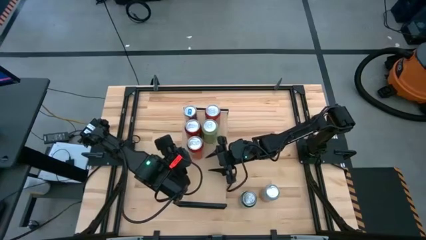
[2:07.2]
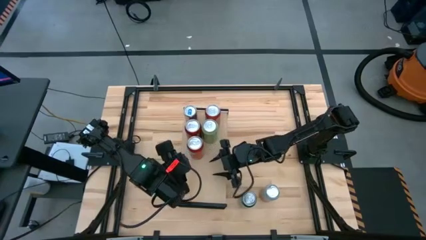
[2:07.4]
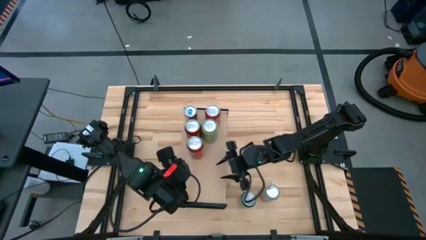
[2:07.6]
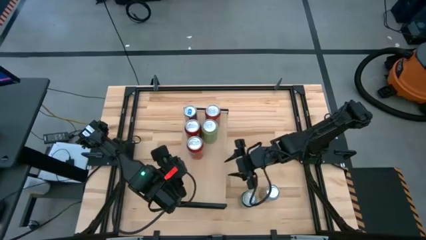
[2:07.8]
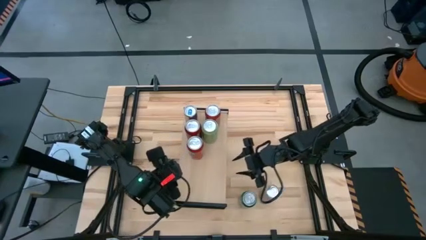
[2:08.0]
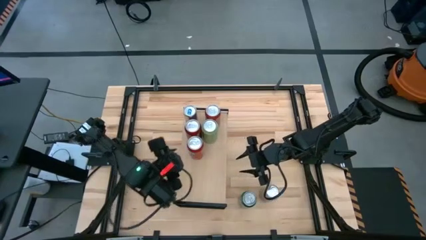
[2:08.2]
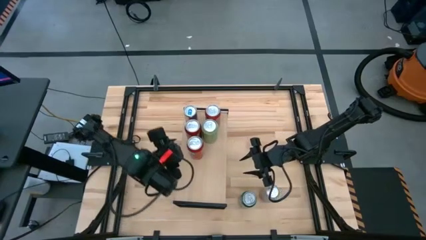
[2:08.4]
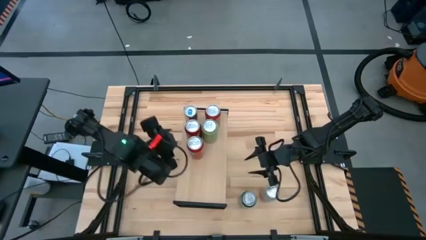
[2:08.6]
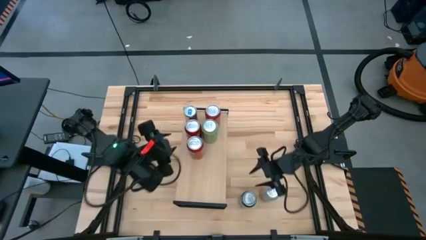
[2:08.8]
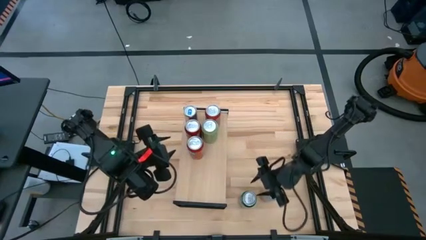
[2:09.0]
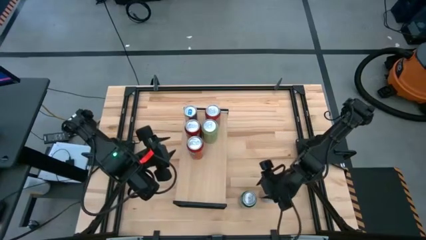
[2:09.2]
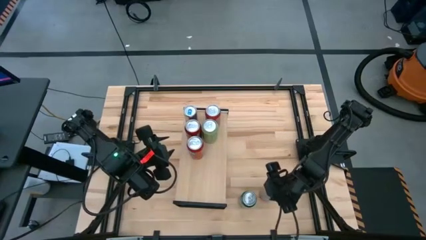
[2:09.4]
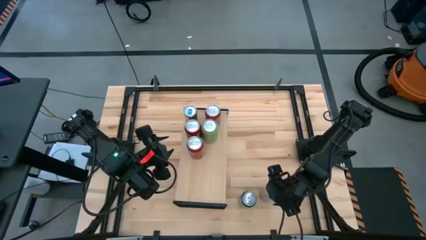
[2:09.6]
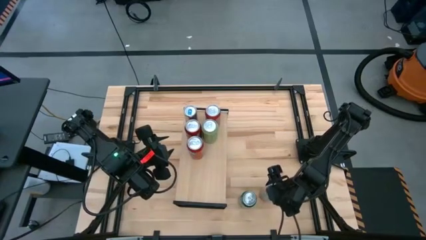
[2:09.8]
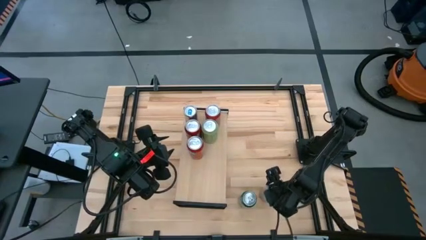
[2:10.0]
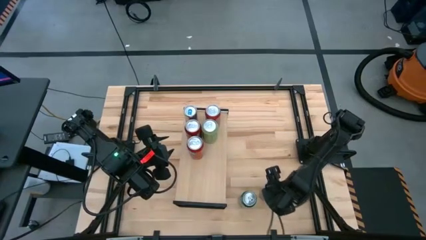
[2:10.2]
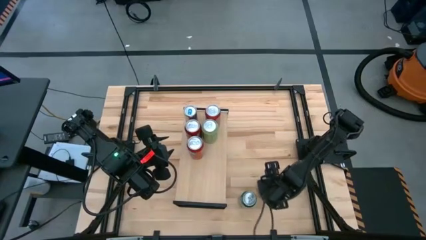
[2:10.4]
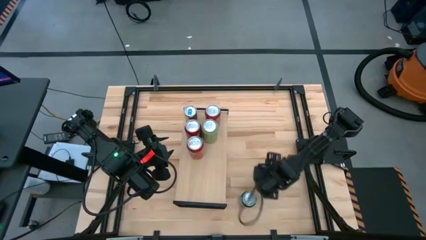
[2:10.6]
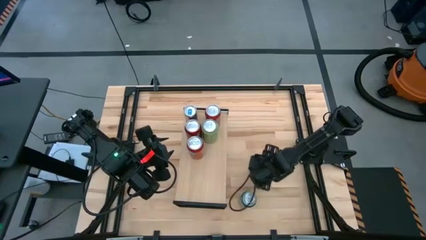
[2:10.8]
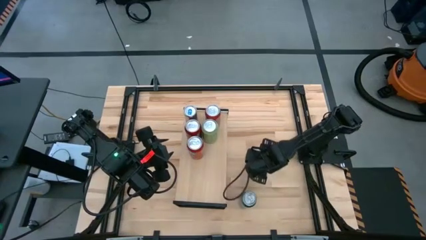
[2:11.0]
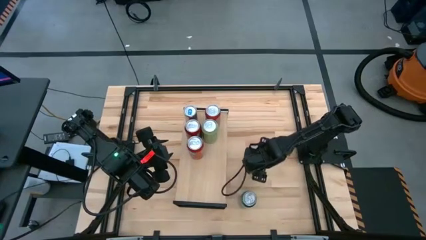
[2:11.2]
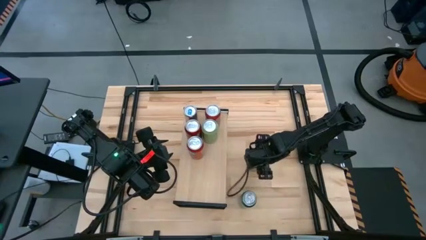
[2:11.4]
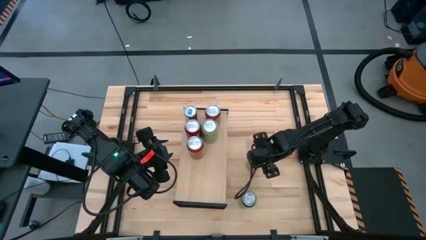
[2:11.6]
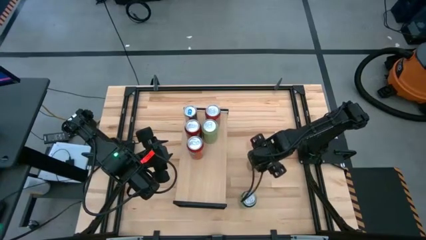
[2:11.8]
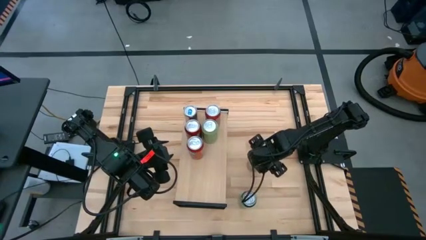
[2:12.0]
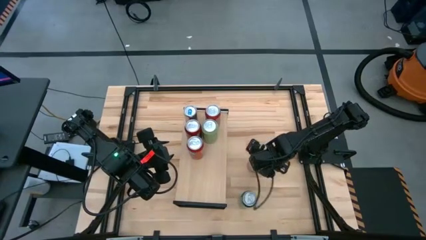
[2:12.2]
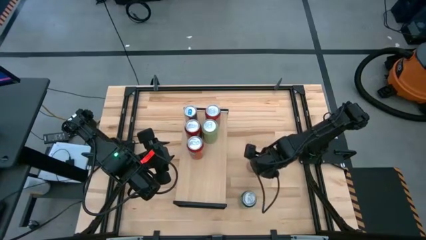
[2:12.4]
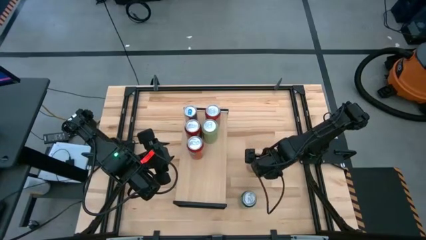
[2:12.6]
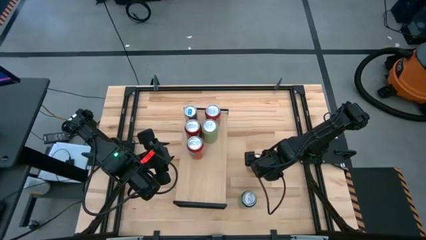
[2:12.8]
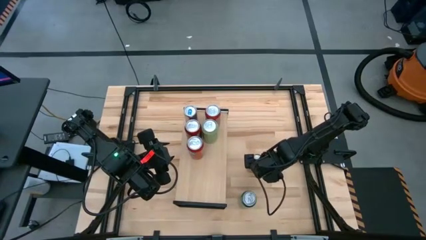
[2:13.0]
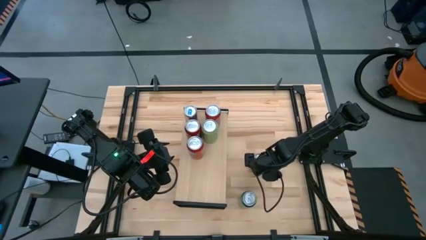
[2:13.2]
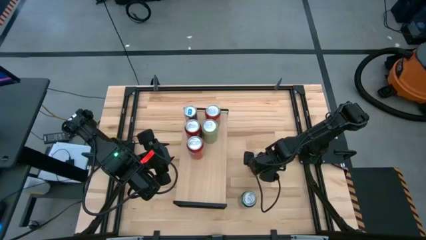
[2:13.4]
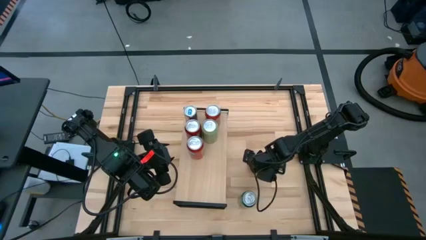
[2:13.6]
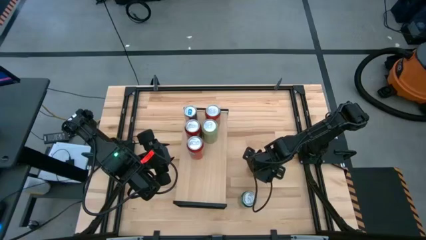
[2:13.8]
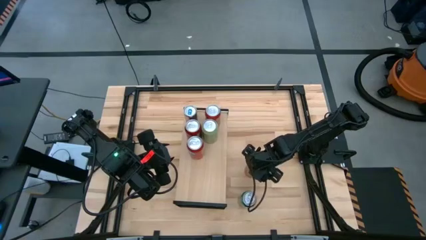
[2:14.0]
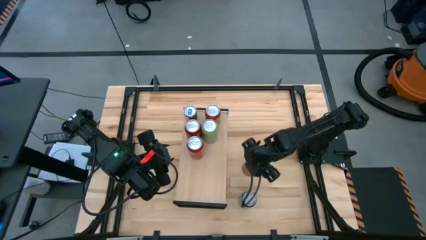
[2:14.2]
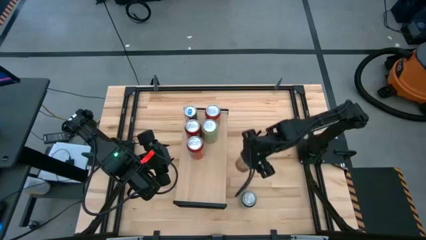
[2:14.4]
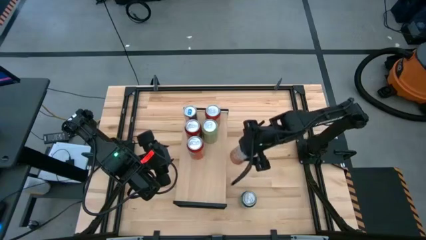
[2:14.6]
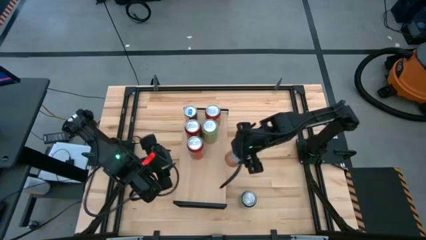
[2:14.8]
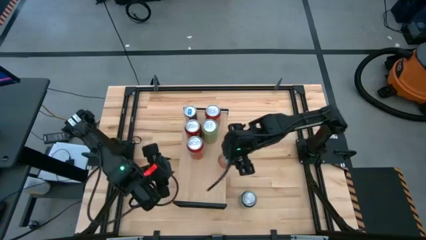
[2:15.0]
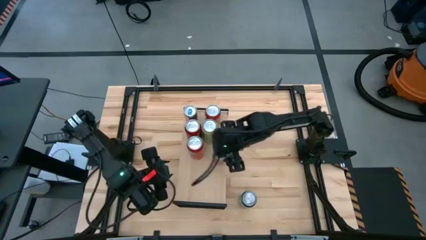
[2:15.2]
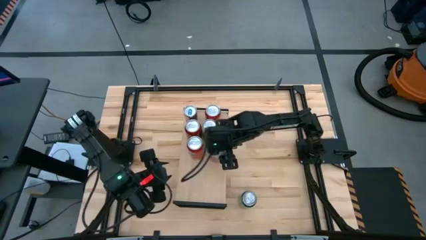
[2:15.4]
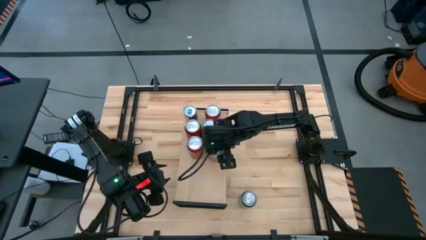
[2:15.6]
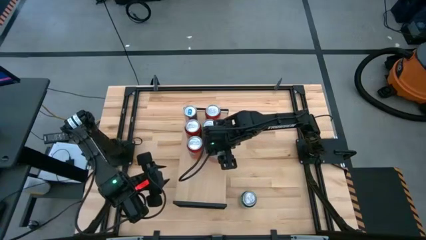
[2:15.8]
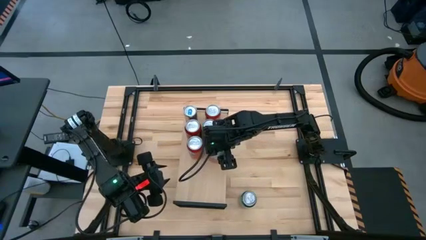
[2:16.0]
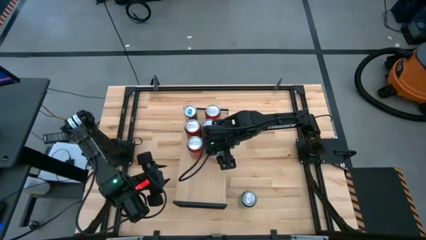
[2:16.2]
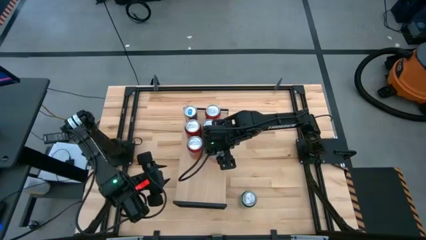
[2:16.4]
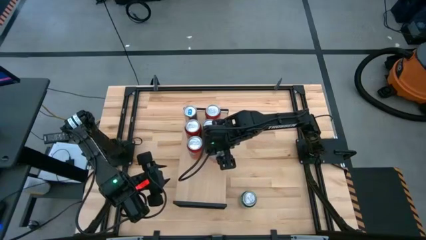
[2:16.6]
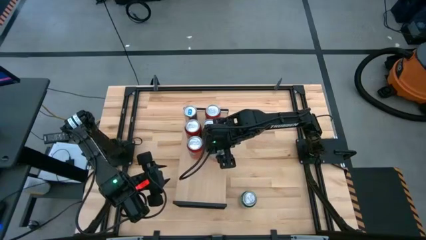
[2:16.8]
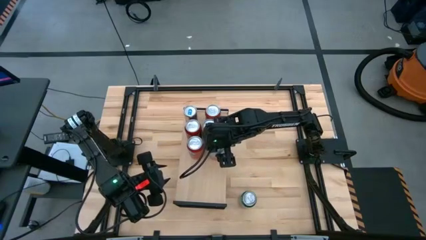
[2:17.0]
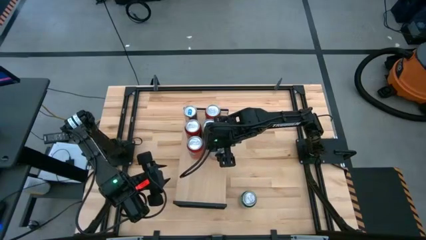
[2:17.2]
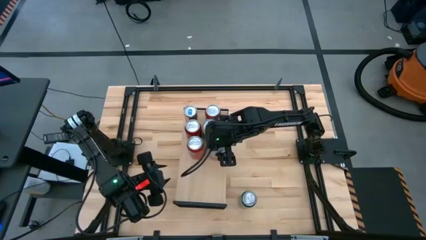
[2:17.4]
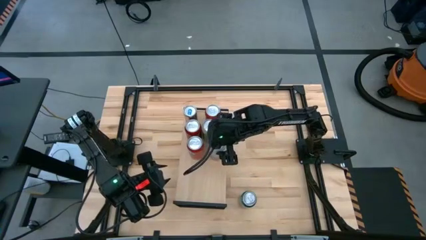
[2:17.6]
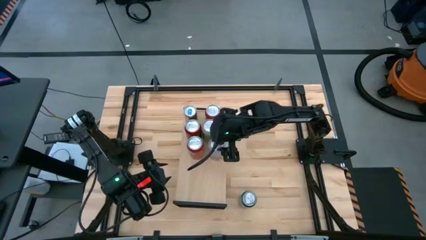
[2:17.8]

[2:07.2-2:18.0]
Task: Place canned beverage on shelf
Put the white soda can on the shelf
